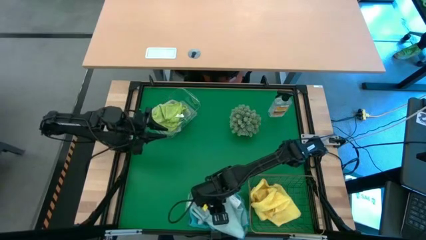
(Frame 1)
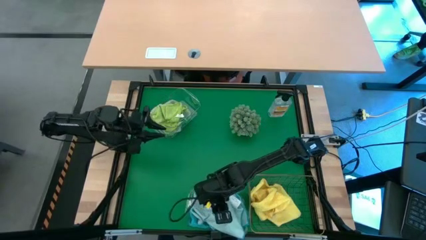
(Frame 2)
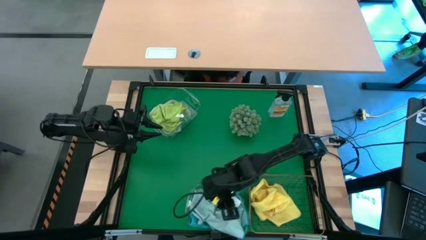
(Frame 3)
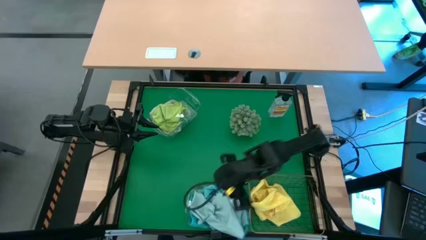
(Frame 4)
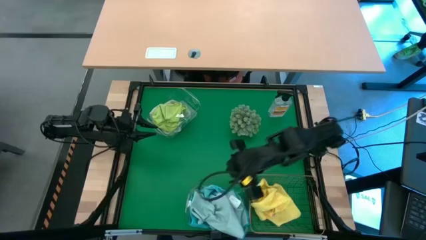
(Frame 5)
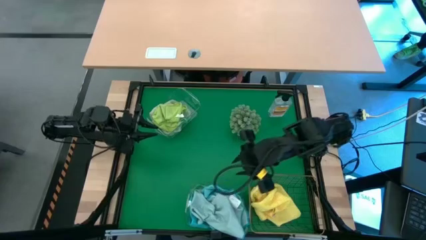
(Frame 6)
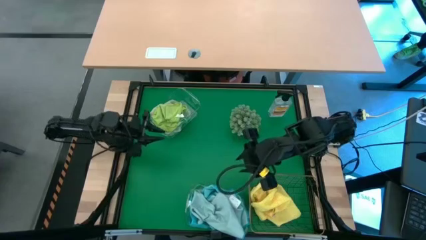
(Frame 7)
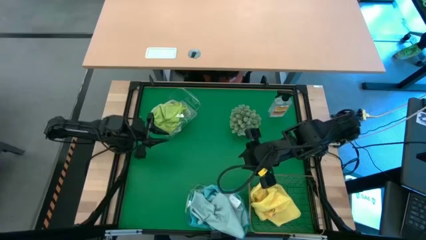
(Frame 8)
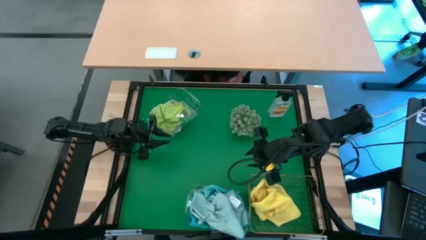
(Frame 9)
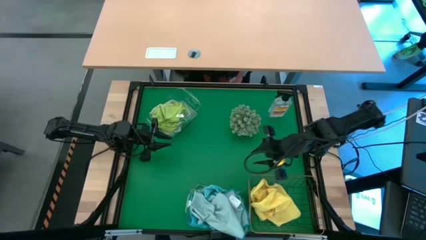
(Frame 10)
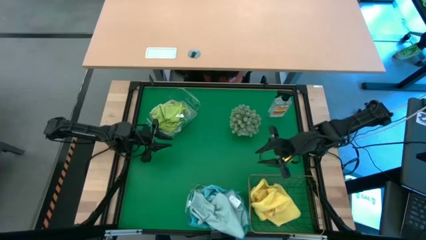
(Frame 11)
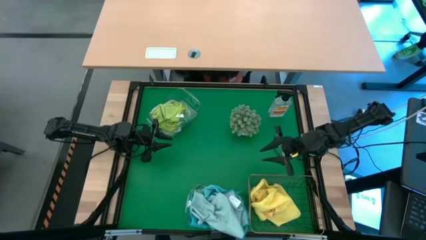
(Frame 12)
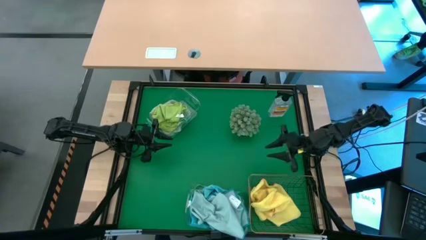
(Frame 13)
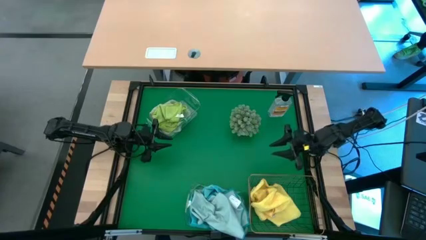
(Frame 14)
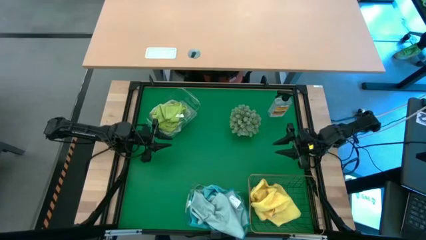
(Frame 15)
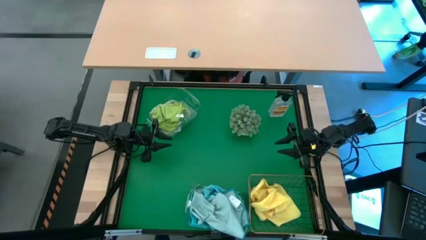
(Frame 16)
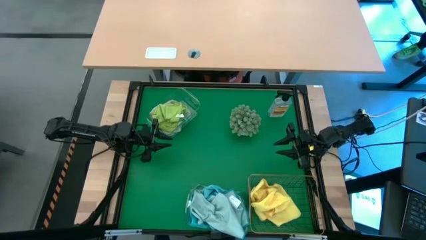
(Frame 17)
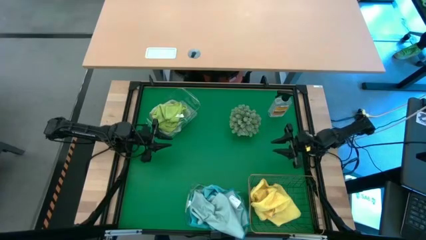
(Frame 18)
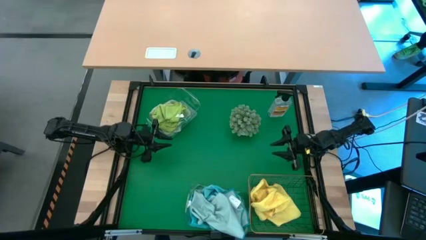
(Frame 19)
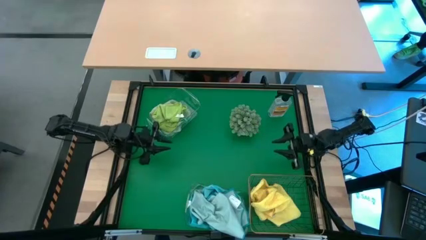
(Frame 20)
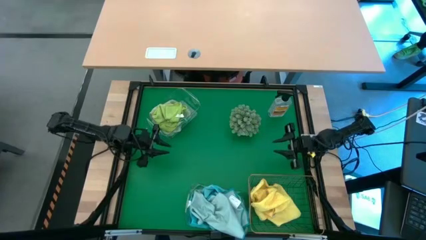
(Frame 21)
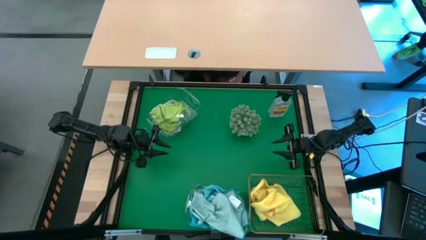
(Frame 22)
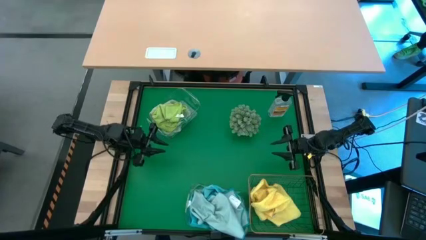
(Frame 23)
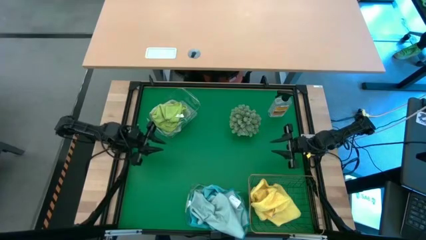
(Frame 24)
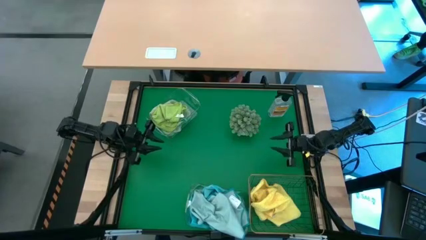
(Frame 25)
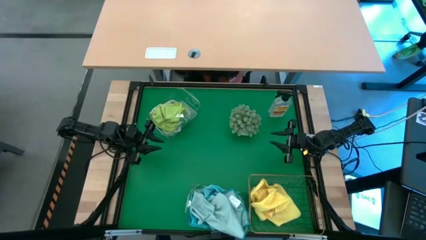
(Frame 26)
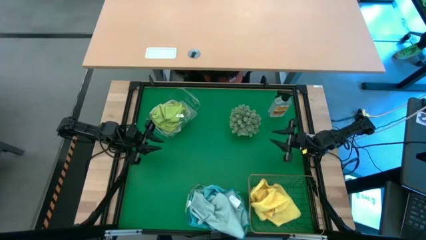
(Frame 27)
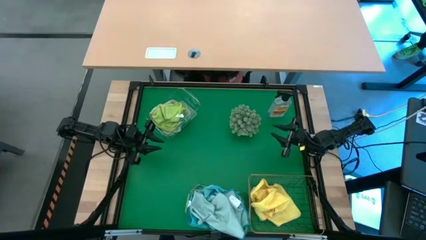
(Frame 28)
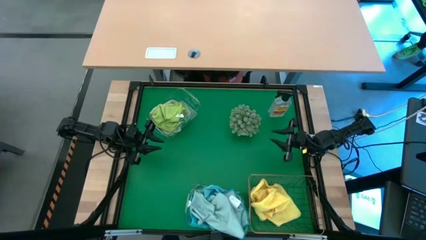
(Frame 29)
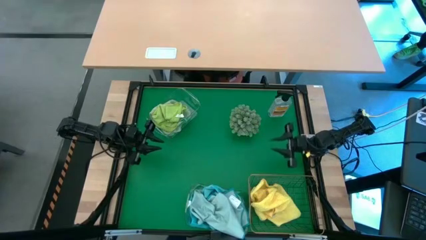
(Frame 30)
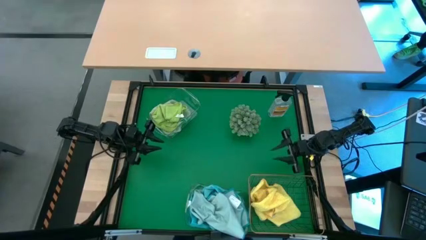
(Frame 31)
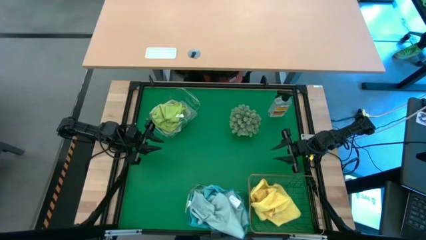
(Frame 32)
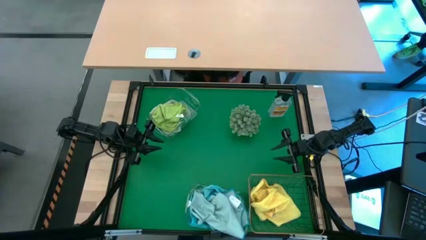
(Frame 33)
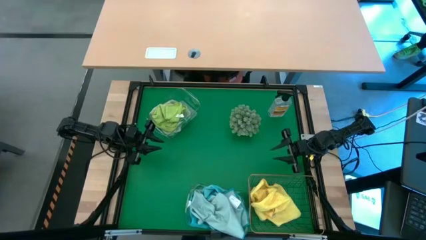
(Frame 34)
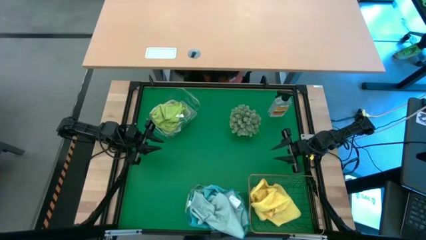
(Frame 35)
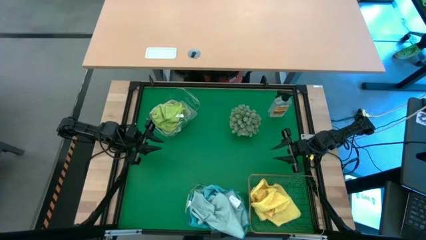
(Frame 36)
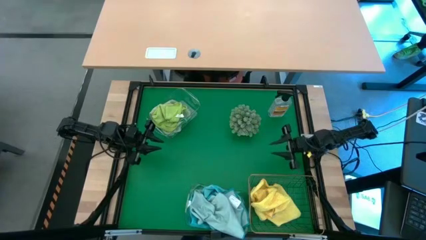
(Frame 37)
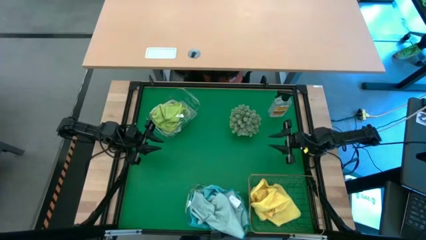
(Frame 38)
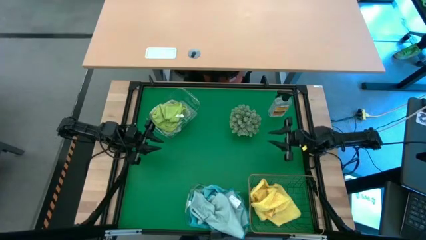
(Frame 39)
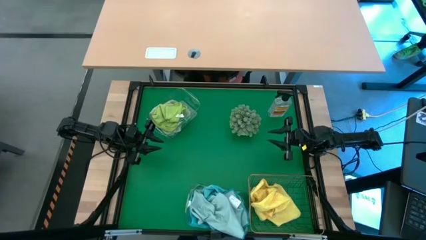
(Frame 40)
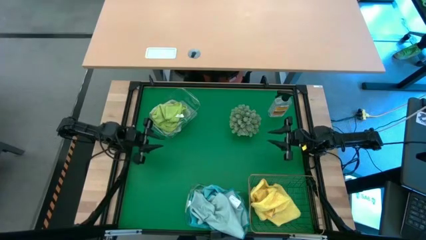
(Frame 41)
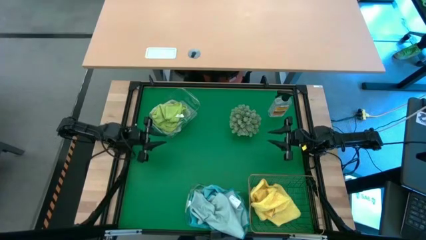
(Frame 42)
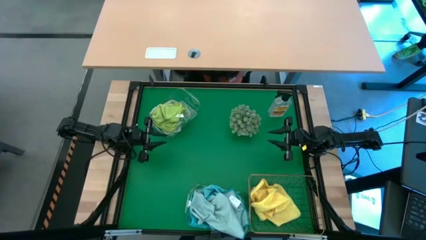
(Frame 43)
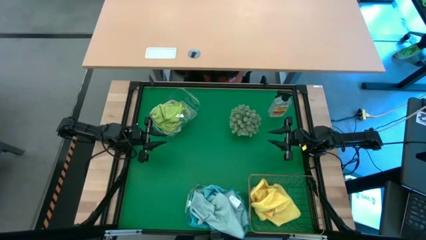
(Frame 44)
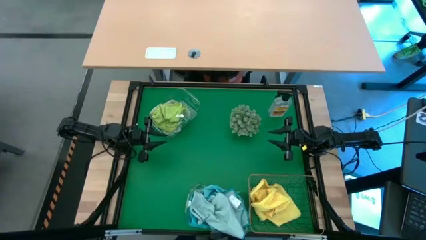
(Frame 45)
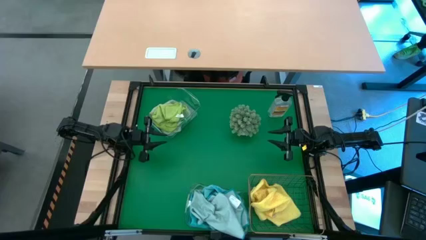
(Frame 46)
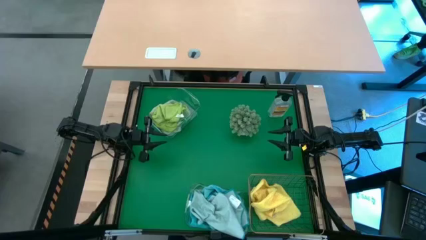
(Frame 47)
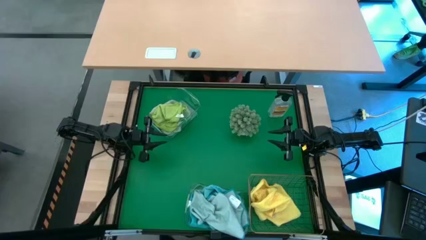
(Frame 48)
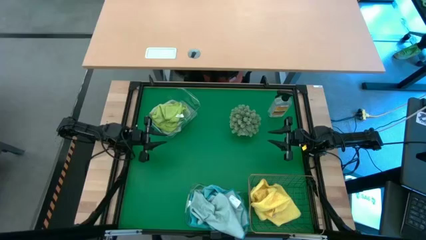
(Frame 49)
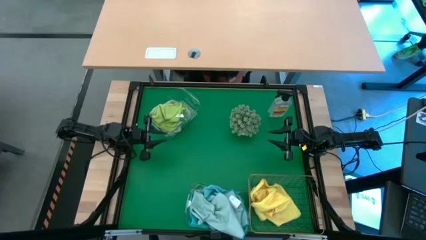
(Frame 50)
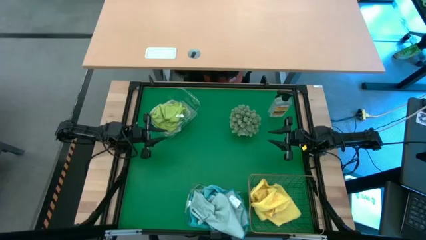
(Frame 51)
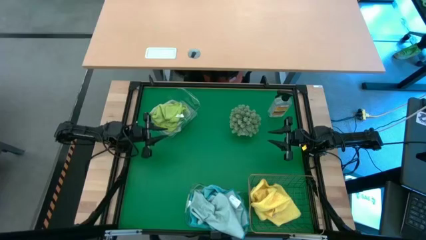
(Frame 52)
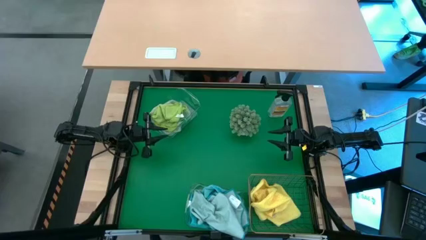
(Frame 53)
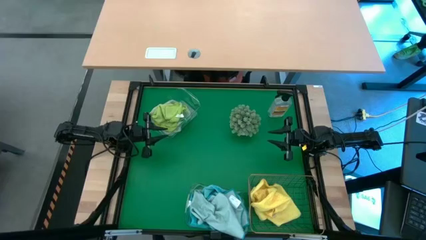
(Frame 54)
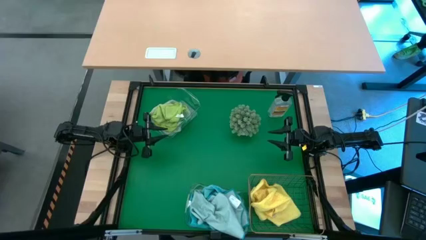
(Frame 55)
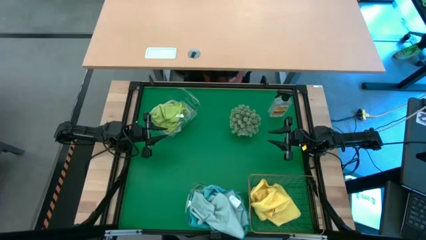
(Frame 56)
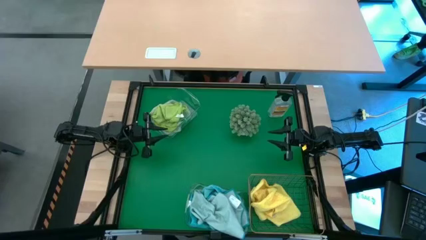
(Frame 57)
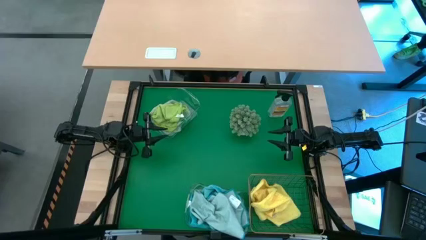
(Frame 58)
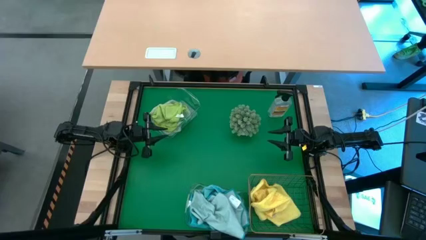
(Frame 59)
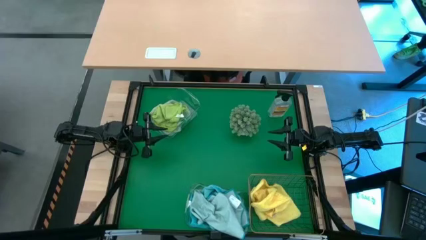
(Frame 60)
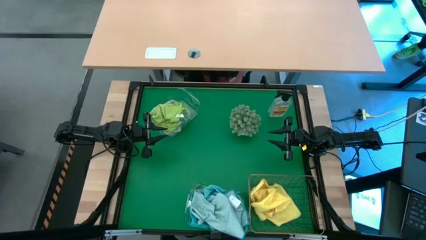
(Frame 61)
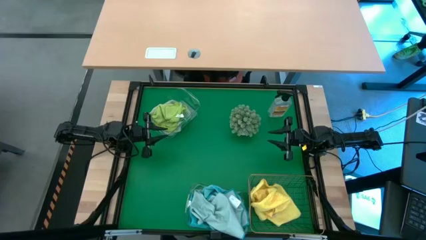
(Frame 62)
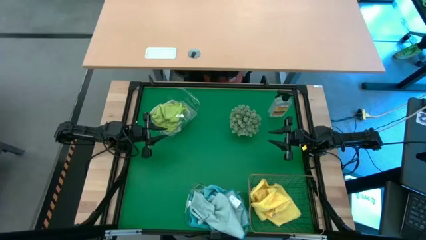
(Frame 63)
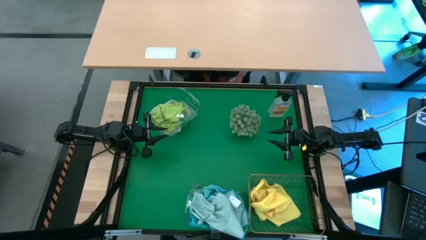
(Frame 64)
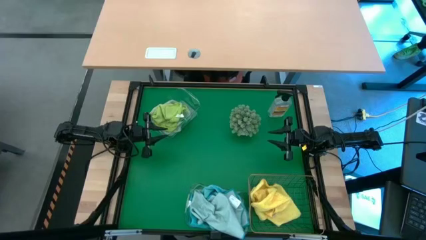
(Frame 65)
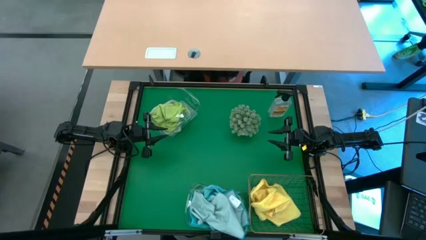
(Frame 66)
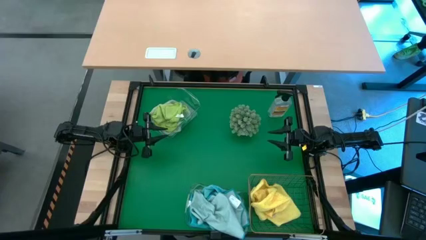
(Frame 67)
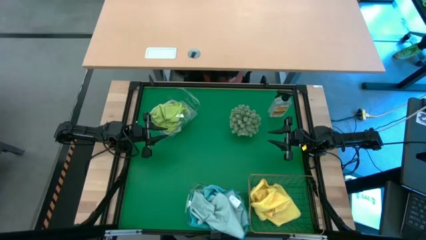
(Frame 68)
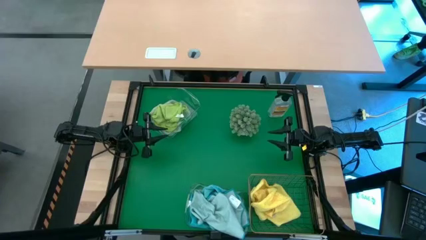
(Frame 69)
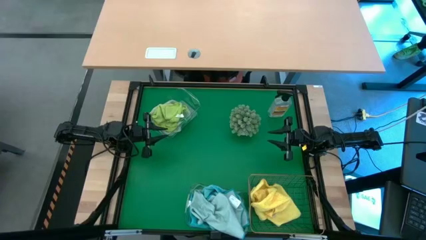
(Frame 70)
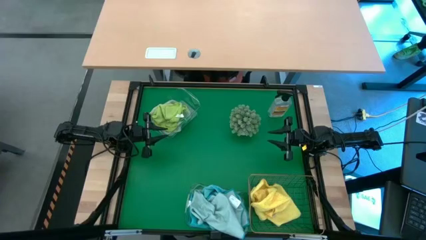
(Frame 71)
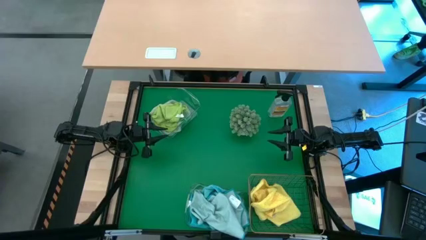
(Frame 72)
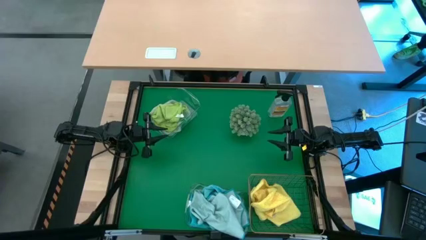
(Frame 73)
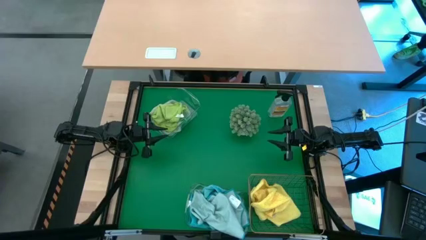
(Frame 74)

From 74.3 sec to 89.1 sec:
Task: Sort microfiber towel by color & place in baskets
Return to Home Position
